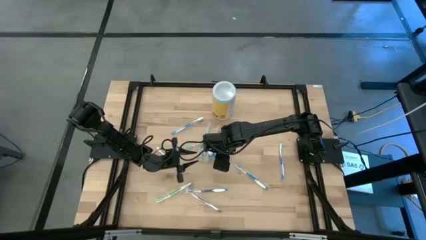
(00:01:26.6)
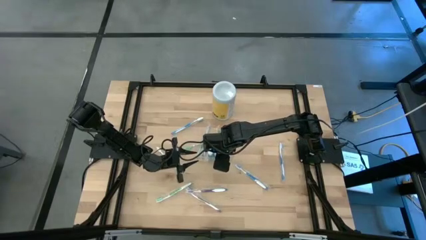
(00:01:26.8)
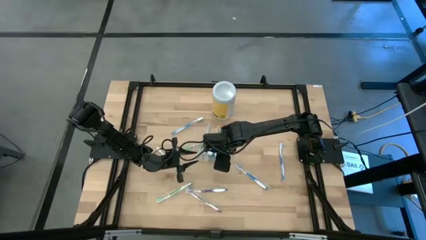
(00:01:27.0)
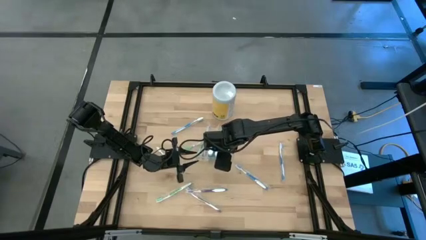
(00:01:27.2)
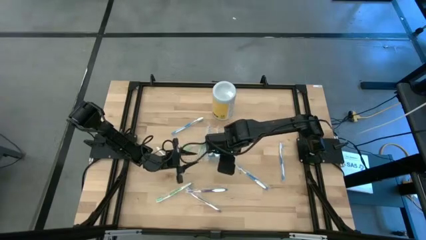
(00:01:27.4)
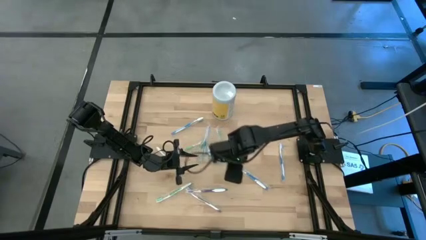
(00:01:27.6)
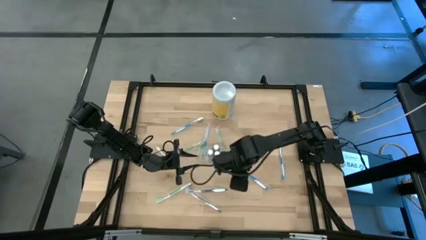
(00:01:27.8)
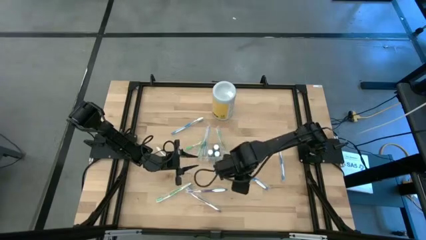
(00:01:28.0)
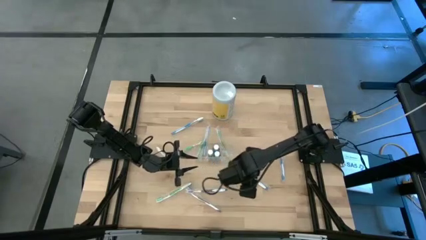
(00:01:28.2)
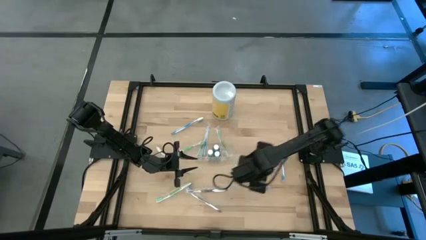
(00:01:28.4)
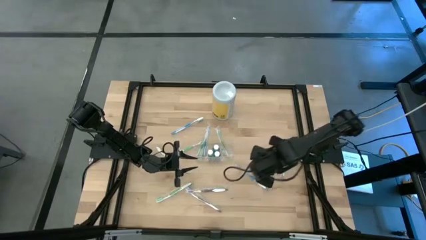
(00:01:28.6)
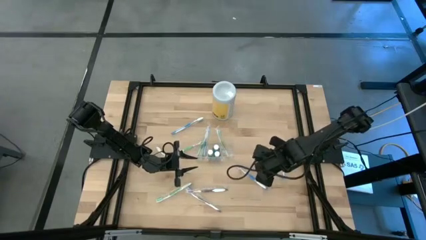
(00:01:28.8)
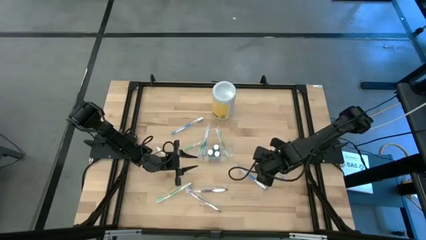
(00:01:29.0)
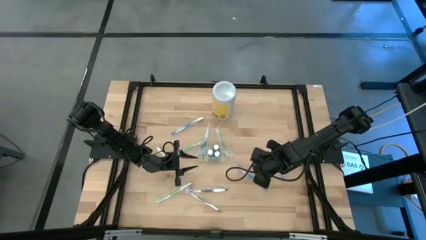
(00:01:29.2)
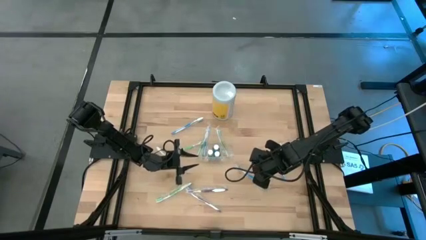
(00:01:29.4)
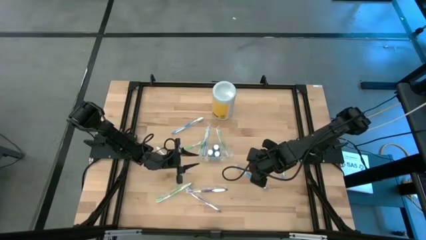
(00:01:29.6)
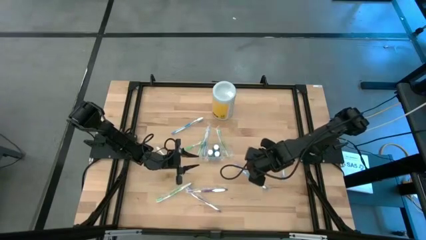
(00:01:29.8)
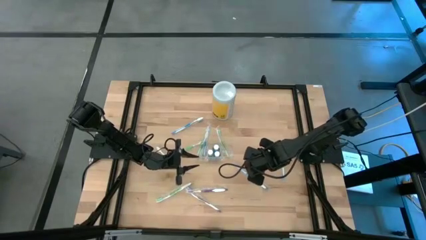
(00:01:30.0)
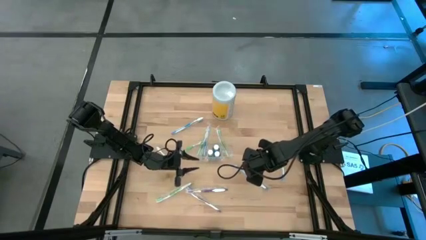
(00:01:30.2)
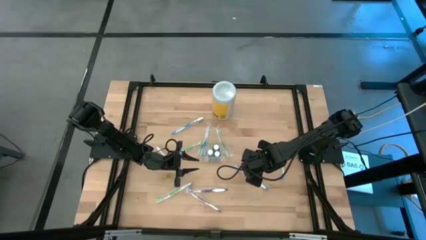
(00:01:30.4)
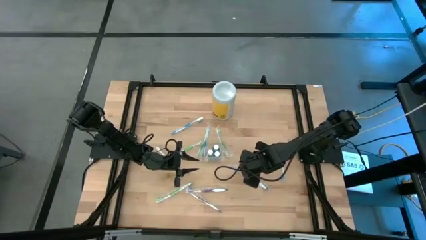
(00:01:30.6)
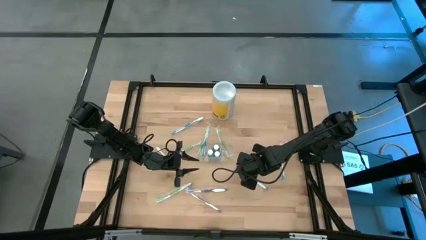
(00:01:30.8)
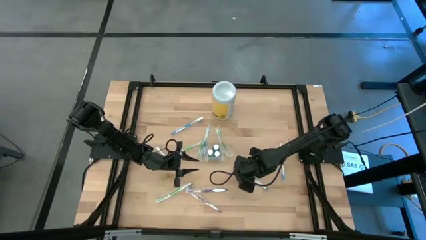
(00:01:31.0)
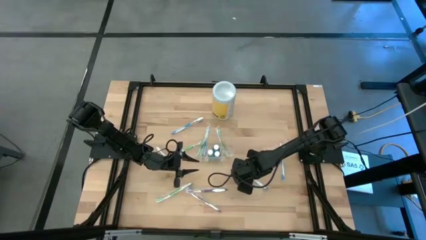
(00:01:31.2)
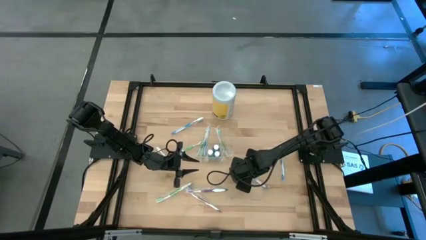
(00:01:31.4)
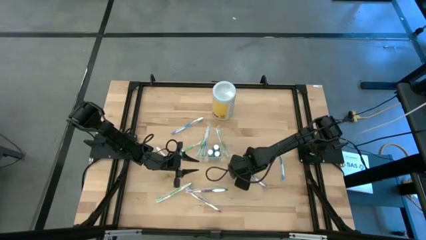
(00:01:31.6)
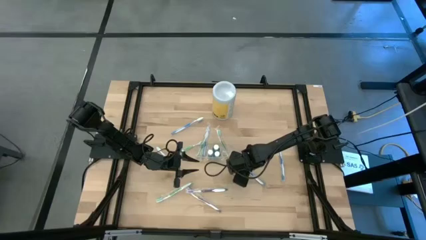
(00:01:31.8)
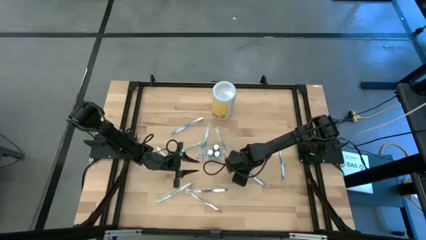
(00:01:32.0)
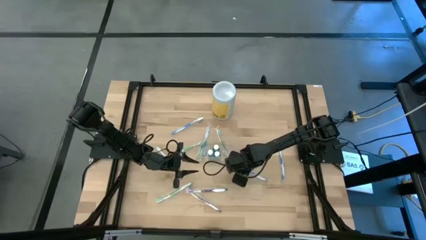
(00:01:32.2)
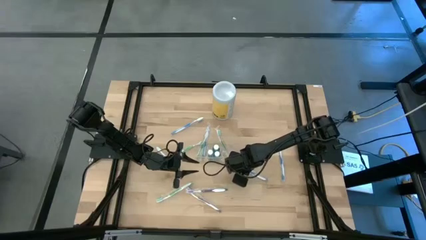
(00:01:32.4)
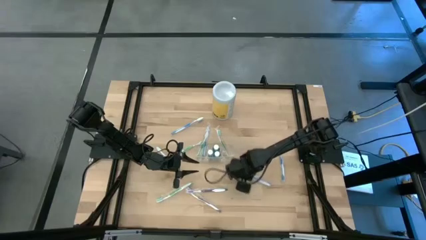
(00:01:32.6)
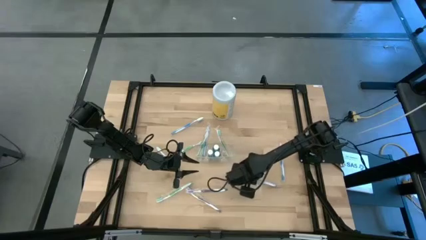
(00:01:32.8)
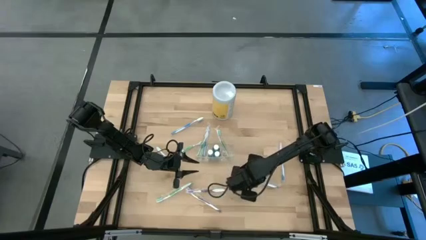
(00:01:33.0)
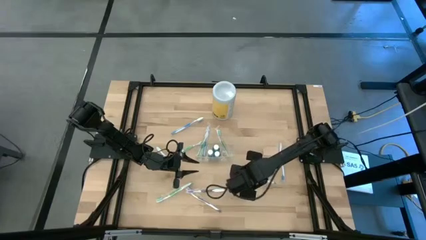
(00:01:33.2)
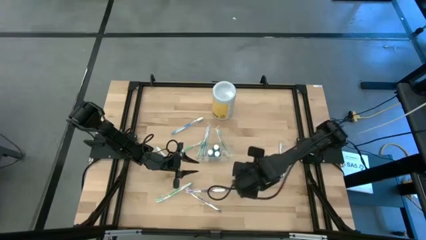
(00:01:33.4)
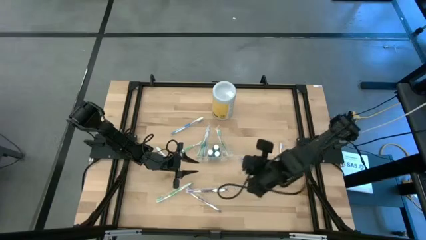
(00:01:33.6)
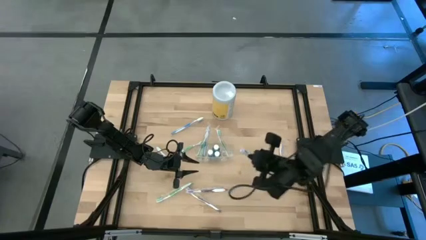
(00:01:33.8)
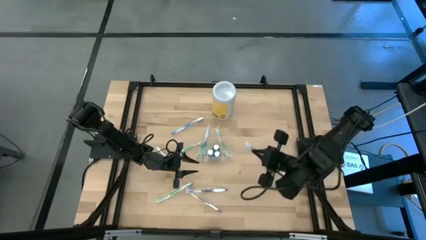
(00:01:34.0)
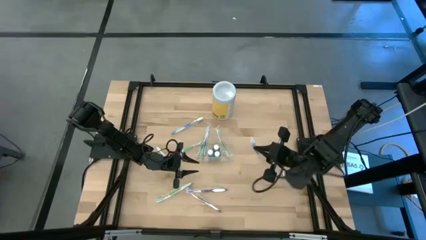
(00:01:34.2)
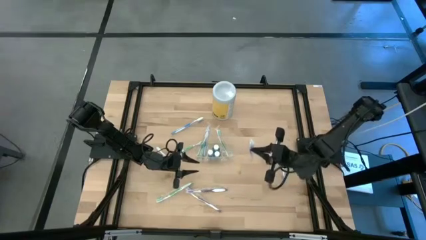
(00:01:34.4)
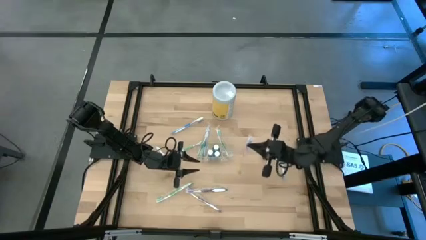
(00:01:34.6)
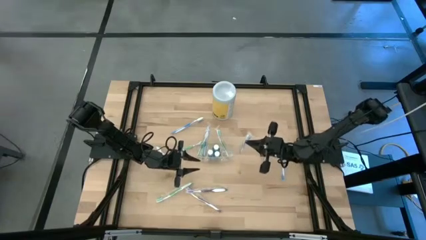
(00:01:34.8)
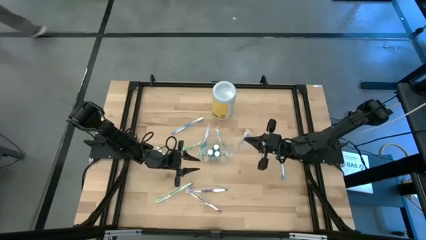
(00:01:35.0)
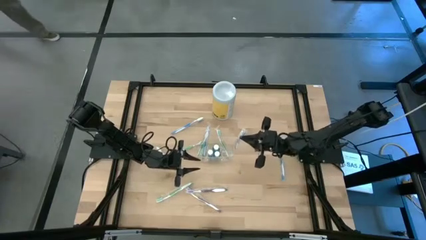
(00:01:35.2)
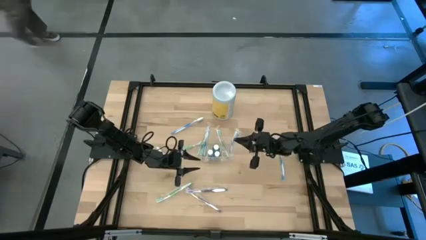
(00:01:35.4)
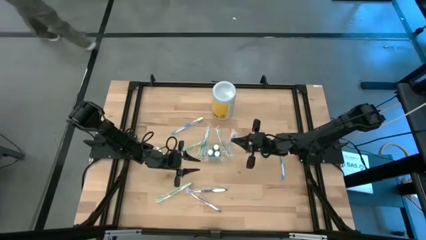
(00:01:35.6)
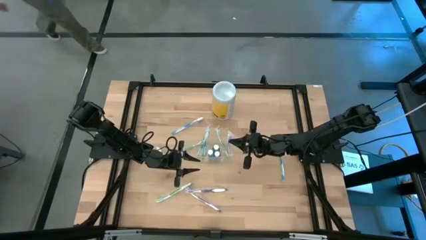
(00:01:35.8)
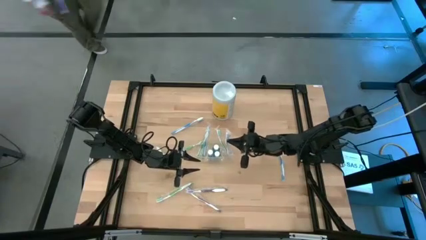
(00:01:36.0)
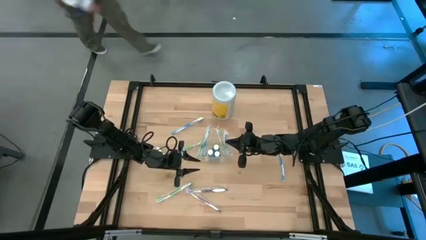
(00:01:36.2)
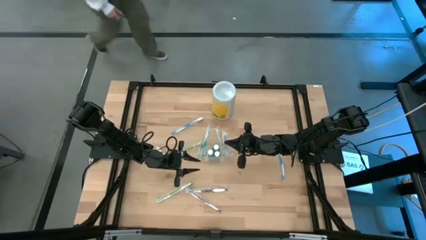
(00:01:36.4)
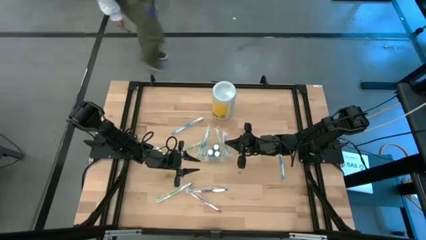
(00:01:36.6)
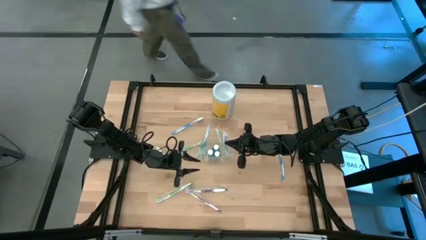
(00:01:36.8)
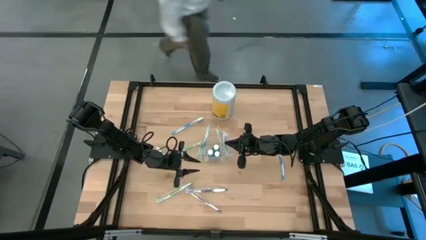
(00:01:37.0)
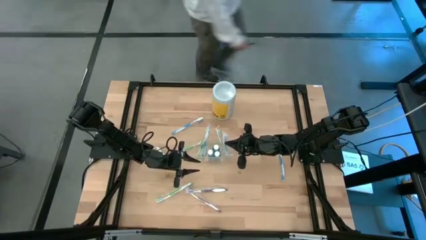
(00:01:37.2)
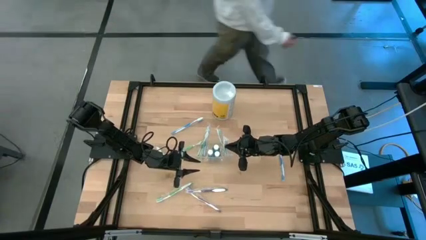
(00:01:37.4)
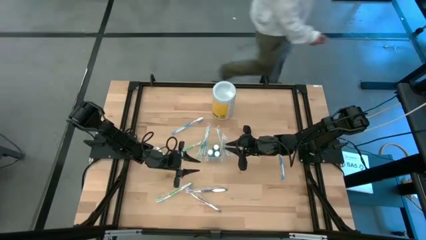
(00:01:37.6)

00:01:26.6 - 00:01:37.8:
Task: Pick & Place toothbrushing station
Put the blue toothbrush into the transparent organizer
